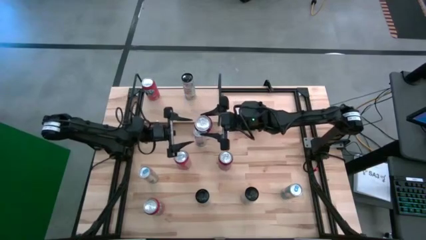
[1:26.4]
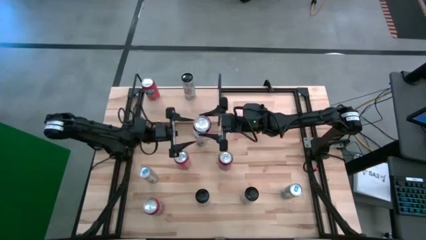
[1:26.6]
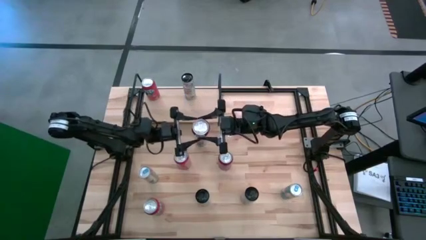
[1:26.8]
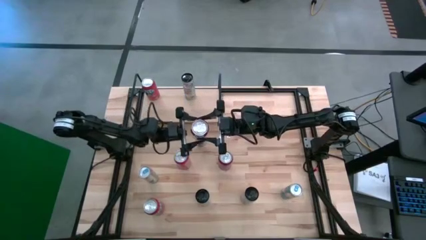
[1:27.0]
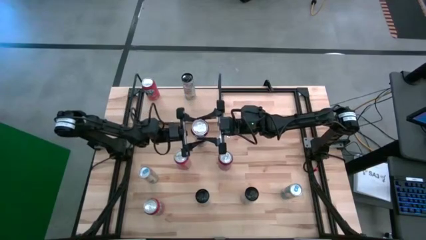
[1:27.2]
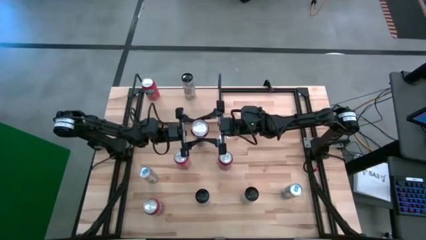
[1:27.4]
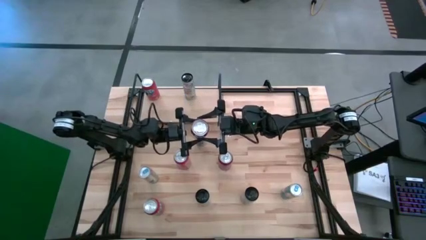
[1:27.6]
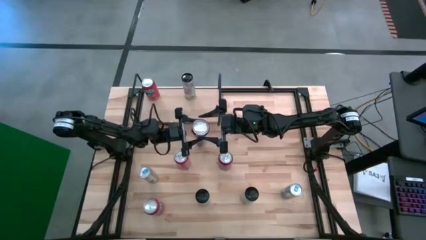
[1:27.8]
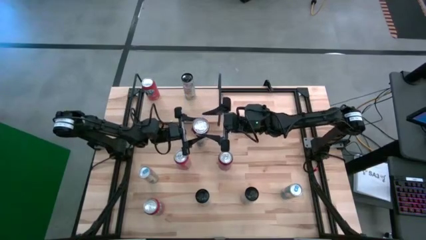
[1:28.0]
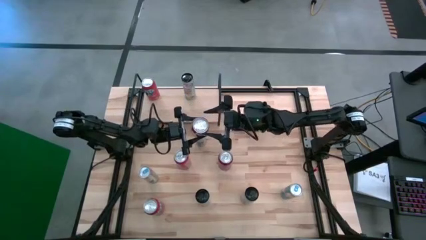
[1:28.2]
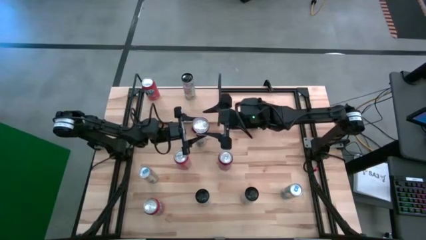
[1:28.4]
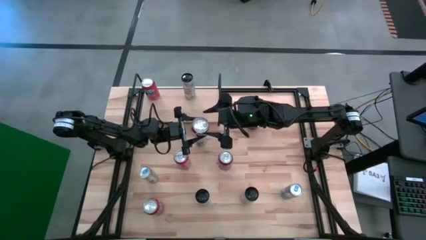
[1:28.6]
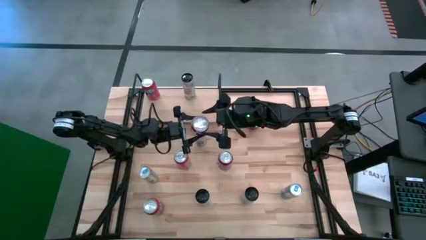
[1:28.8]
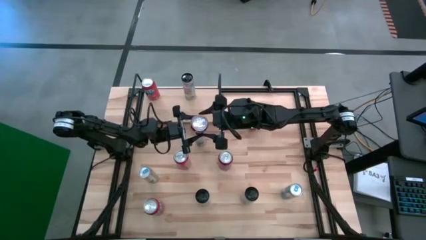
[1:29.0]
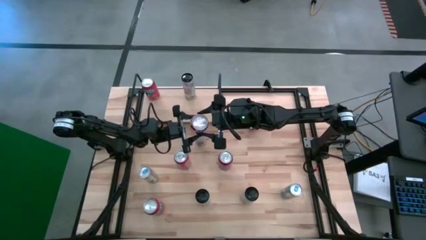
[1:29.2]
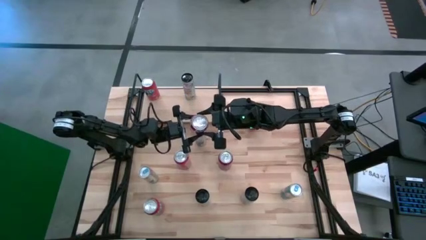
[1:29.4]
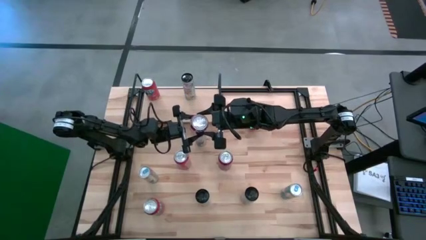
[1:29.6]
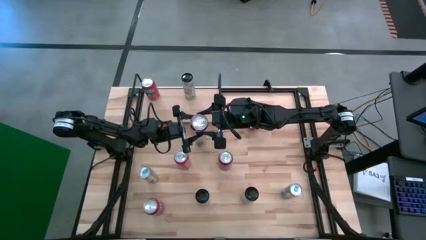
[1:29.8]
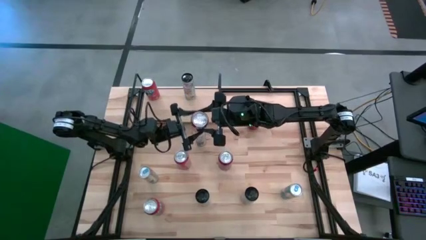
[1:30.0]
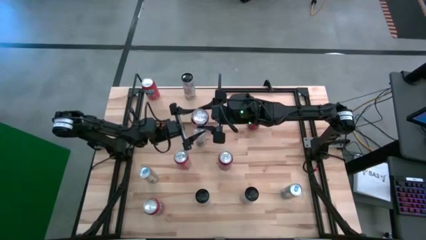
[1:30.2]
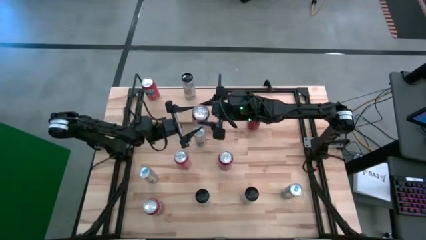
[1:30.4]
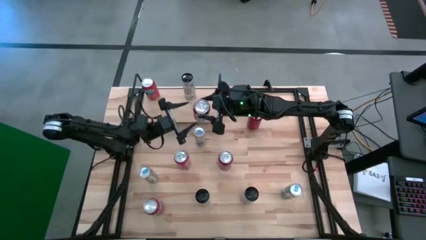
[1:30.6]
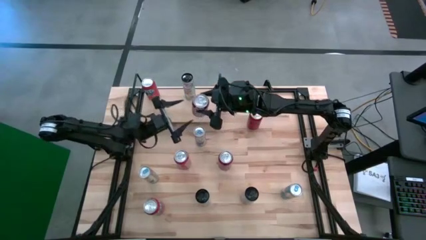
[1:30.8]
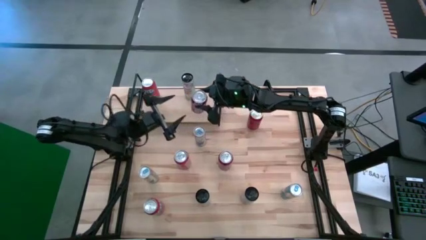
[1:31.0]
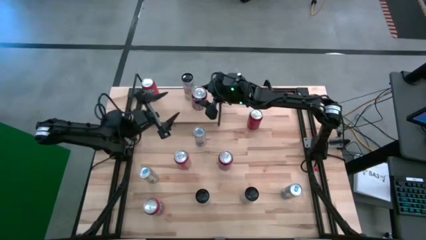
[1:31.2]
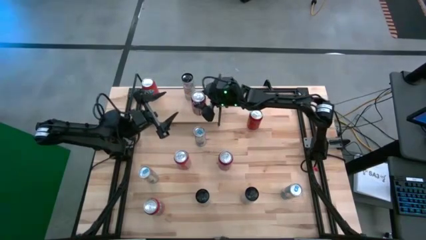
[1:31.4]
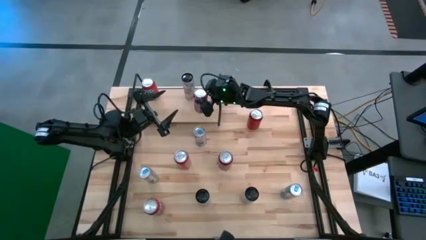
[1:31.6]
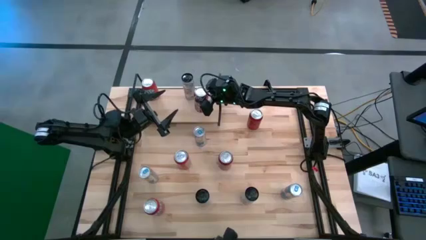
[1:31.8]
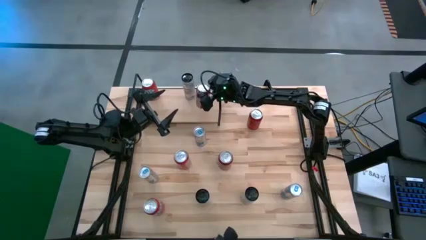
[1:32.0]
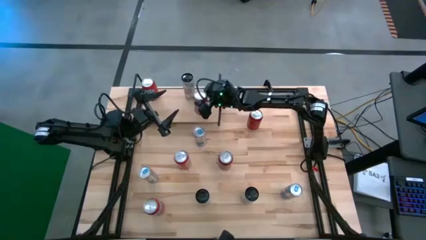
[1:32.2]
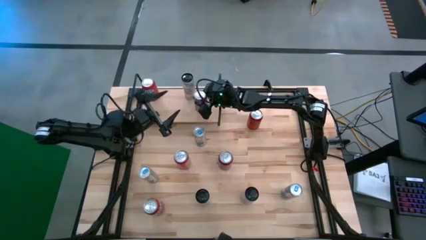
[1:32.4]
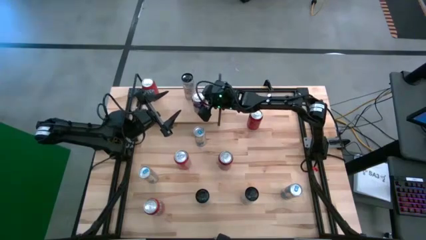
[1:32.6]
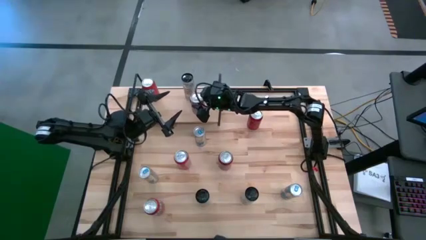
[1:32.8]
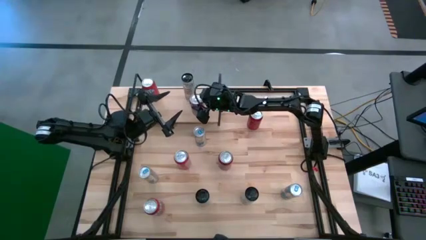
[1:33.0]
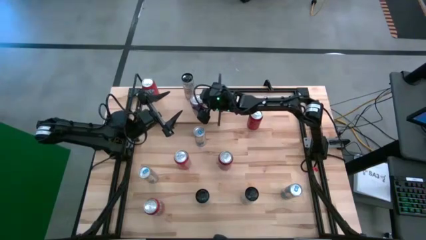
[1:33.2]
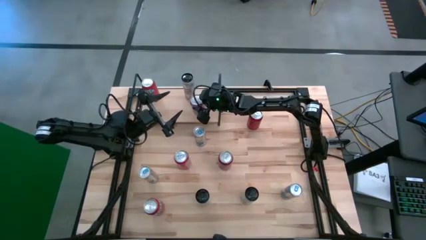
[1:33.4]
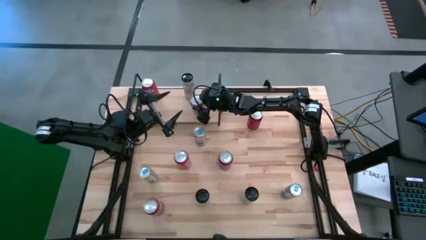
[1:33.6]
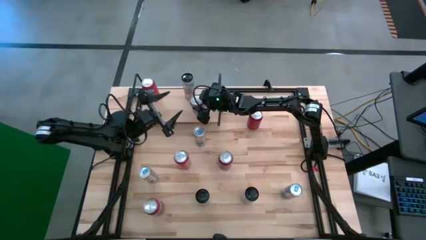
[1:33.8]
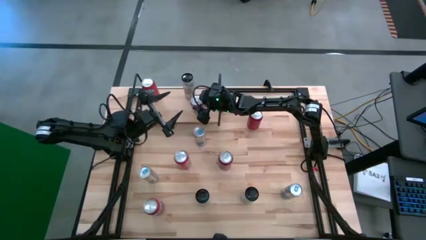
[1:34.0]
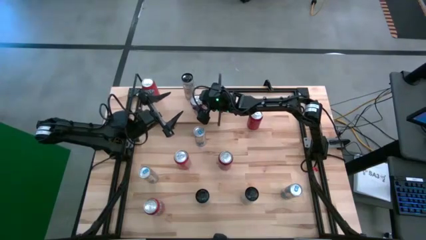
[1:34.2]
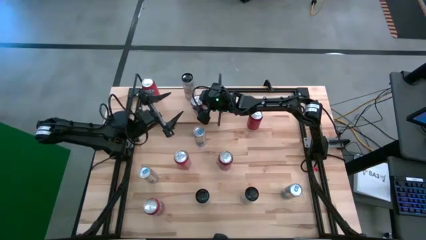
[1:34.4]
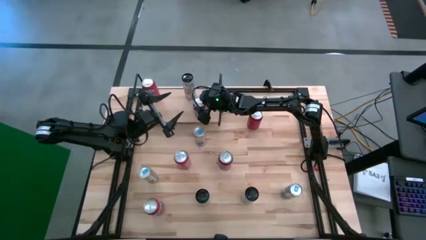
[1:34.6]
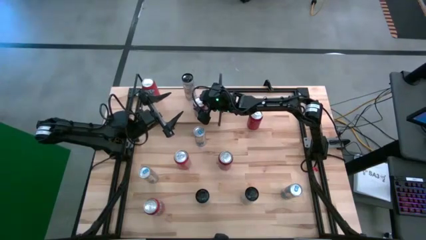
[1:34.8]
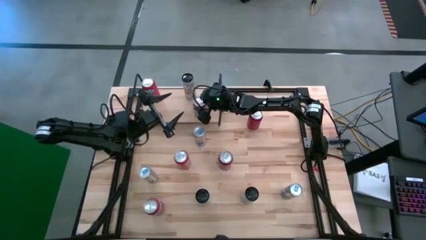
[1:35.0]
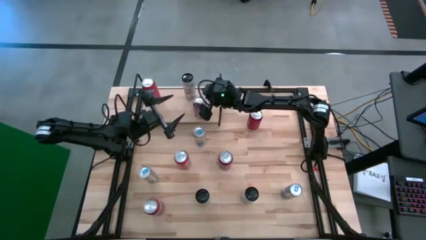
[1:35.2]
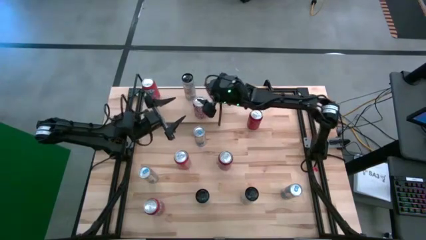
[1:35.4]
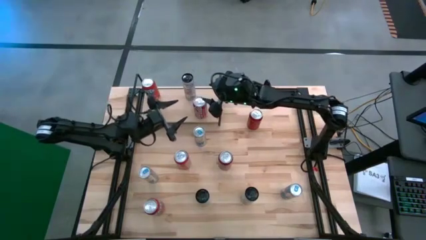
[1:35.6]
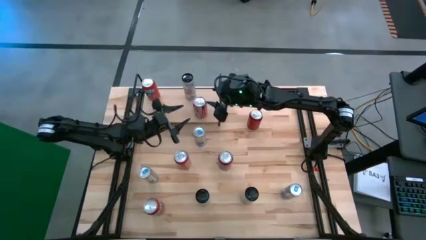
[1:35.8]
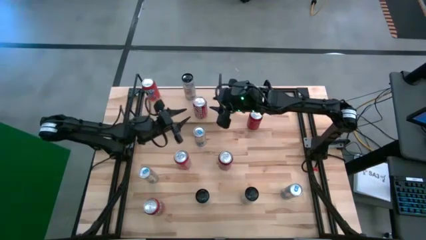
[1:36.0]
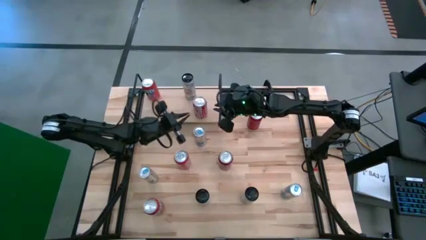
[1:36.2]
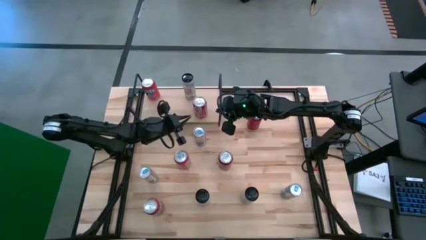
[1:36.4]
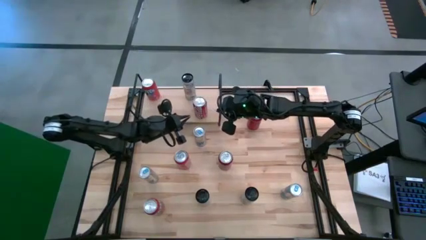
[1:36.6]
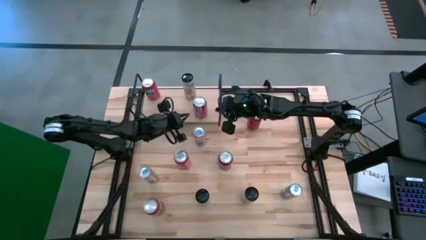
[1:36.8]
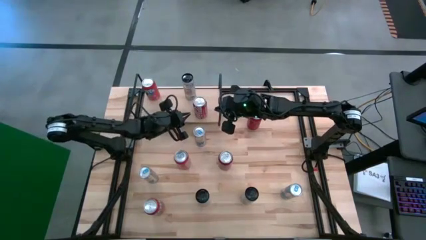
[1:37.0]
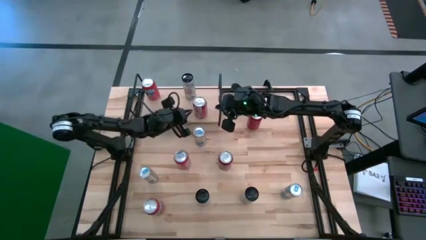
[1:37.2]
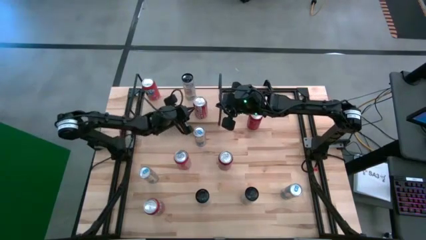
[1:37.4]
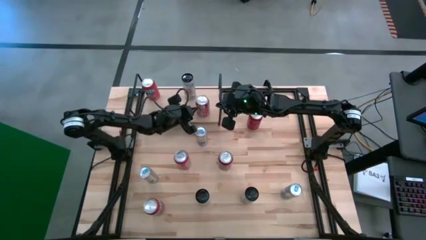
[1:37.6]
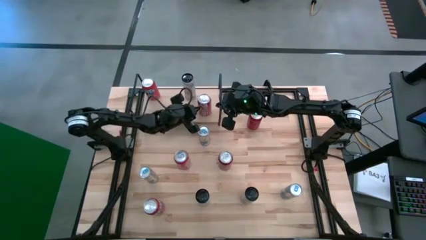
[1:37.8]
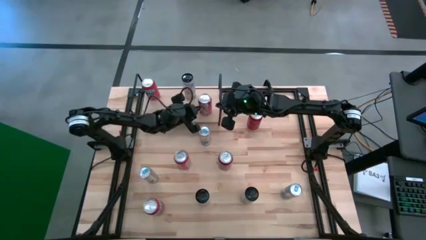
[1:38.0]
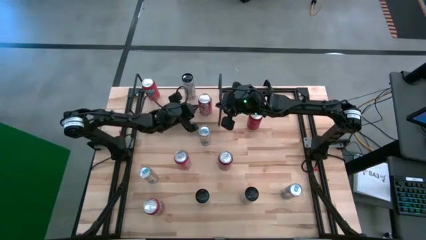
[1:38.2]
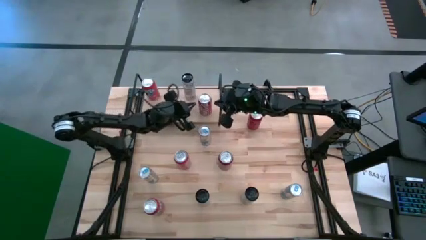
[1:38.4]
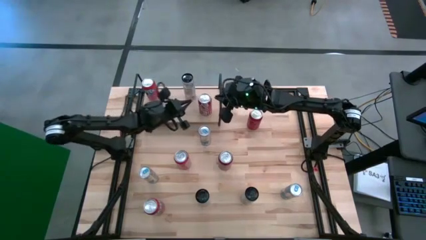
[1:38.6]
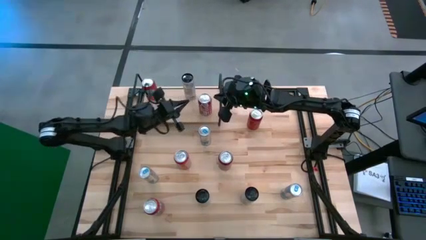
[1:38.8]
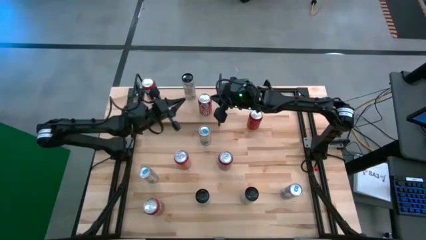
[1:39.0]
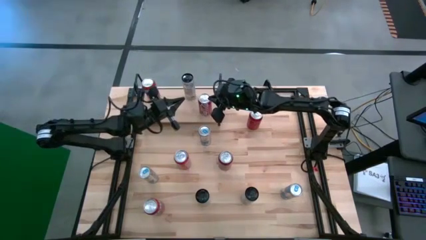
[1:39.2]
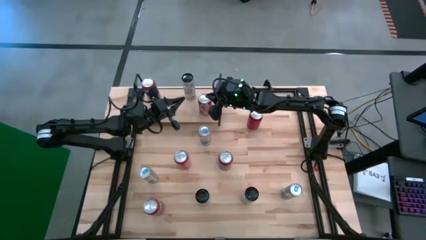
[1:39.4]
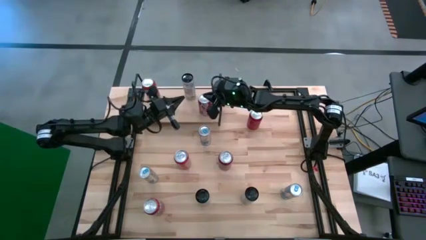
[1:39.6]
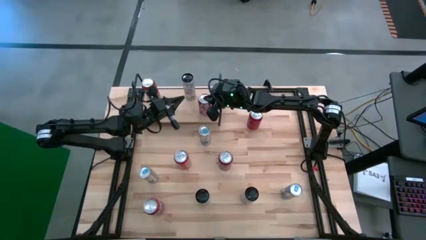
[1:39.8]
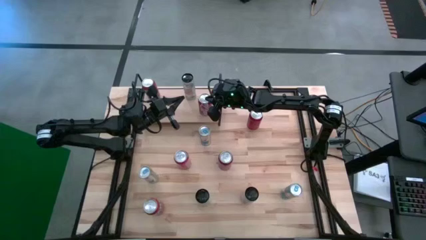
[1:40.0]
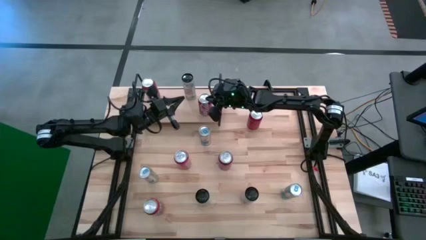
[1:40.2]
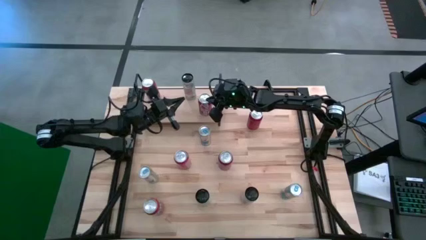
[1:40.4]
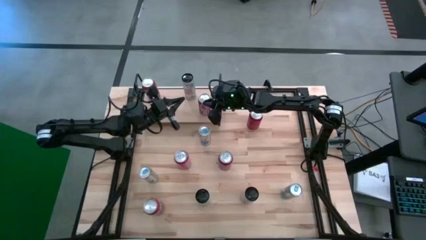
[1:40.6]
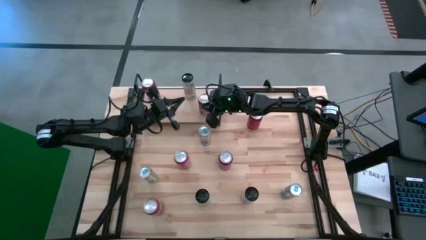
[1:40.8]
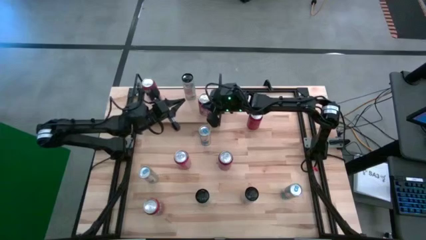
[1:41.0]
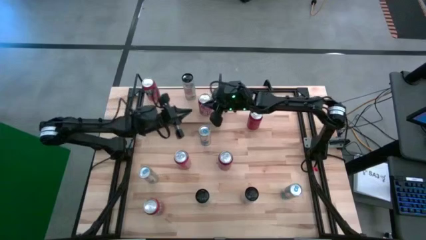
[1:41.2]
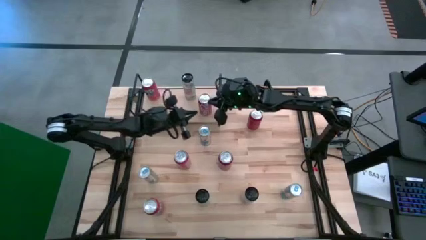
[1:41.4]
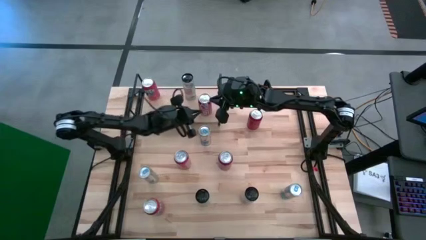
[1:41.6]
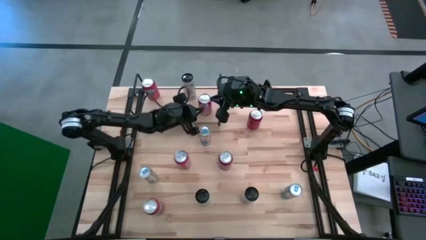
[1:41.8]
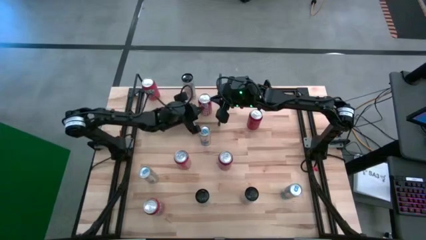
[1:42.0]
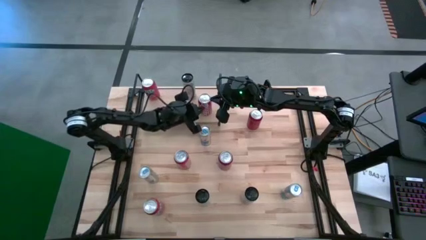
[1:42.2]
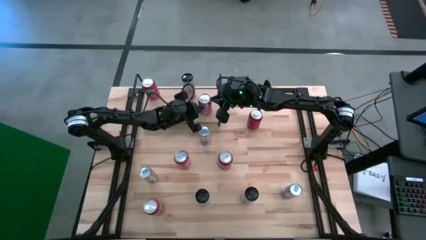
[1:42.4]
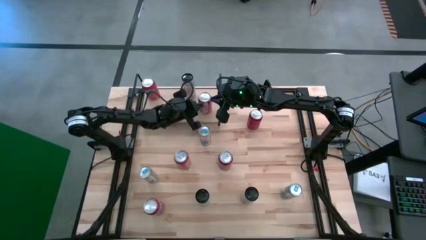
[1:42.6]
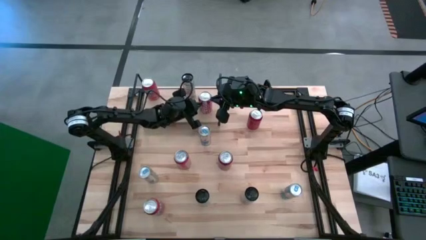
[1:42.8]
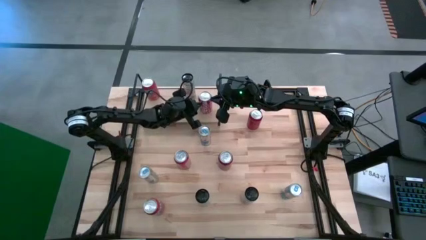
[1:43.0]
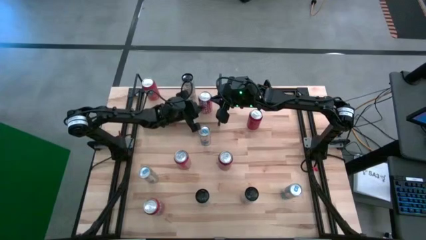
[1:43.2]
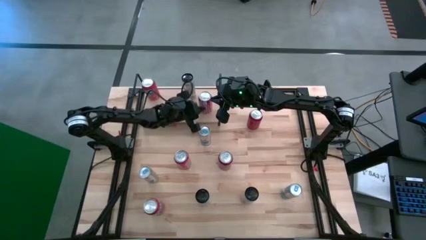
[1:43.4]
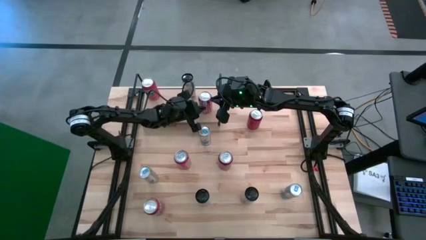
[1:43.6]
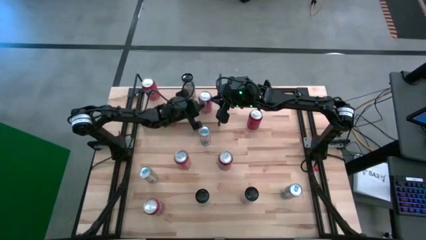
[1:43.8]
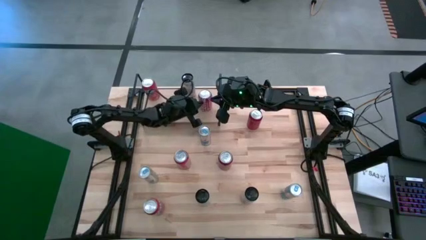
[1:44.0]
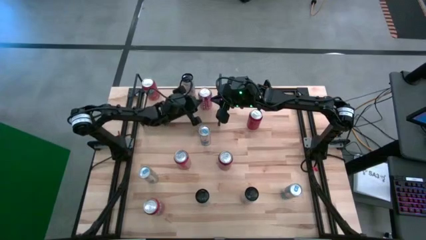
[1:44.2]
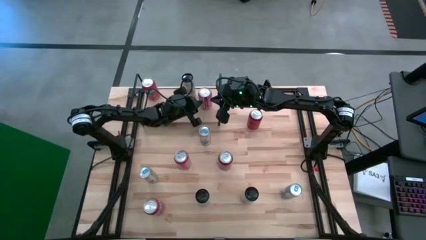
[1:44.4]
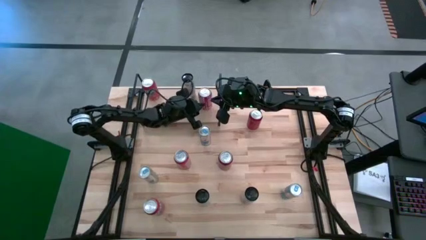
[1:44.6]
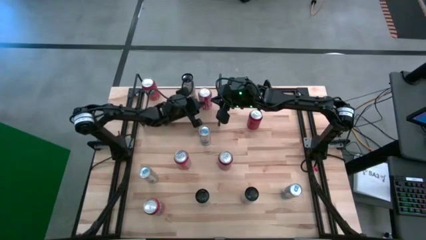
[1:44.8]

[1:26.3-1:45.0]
Task: Place canned beverage on shelf
Put the red white soda can on the shelf
